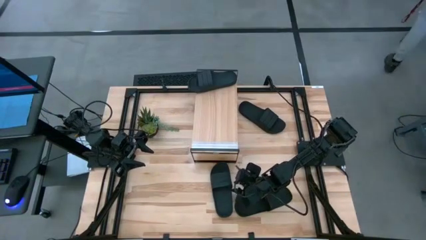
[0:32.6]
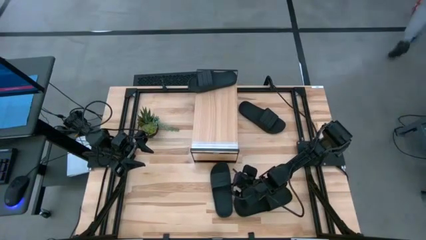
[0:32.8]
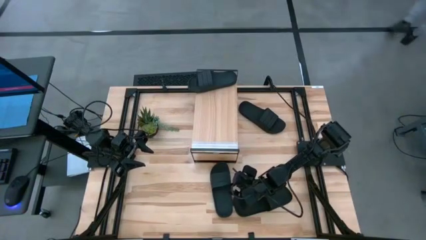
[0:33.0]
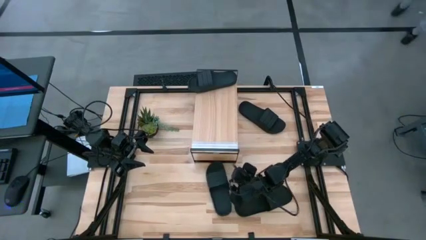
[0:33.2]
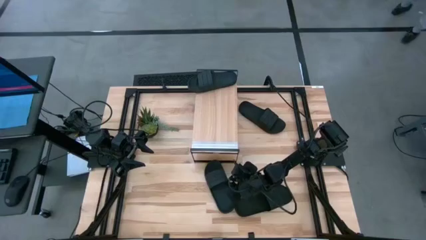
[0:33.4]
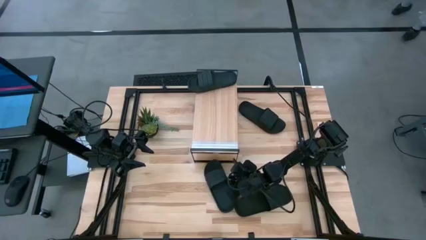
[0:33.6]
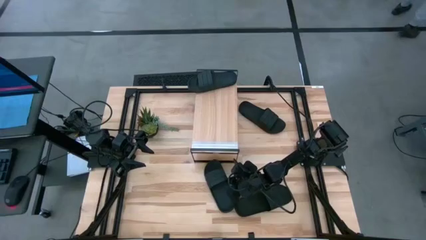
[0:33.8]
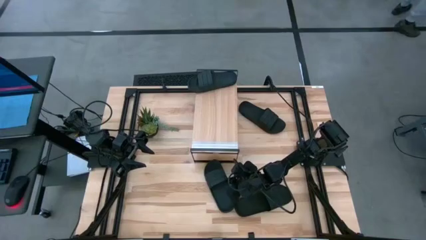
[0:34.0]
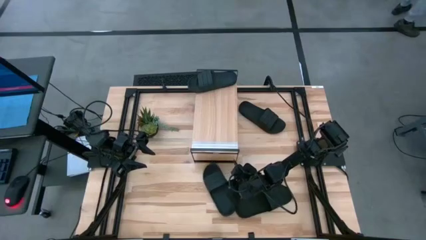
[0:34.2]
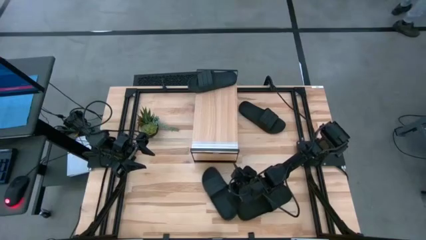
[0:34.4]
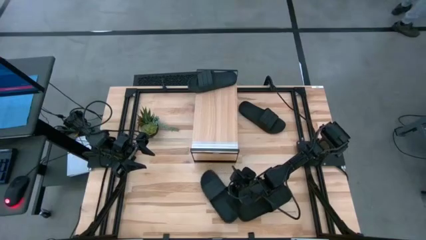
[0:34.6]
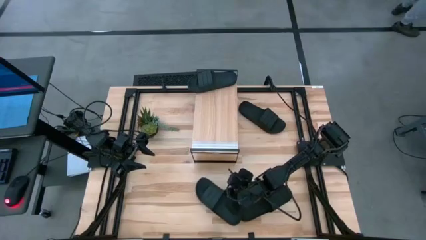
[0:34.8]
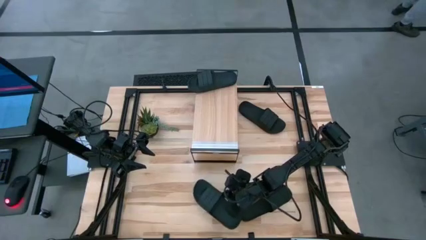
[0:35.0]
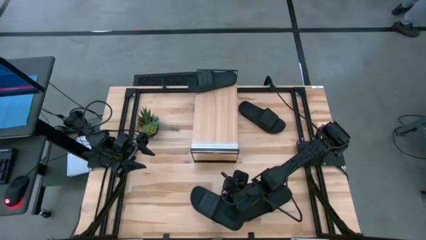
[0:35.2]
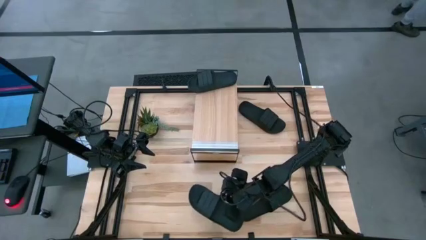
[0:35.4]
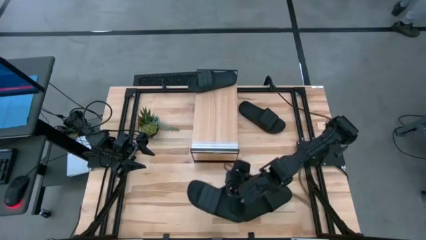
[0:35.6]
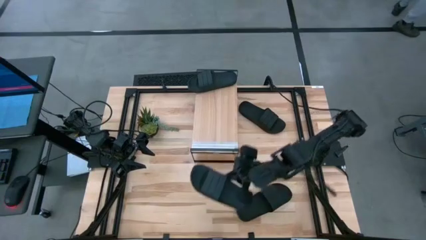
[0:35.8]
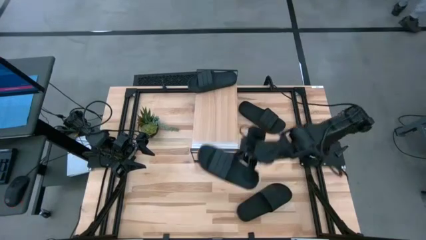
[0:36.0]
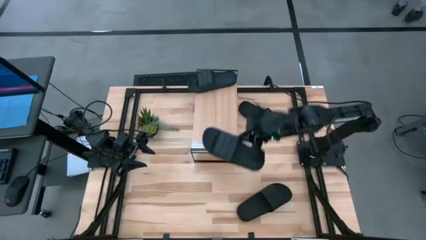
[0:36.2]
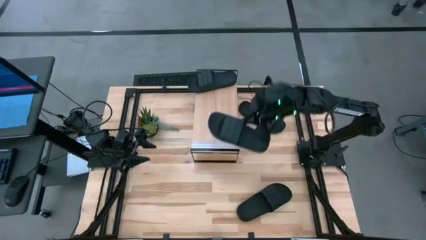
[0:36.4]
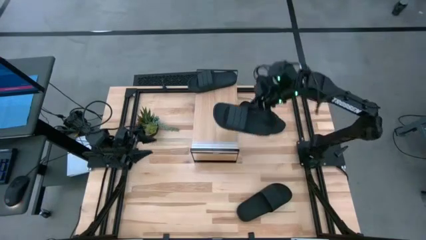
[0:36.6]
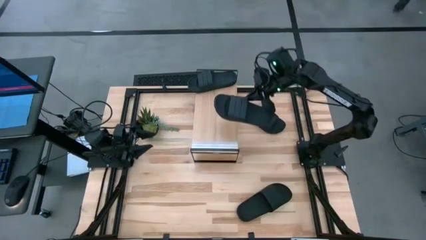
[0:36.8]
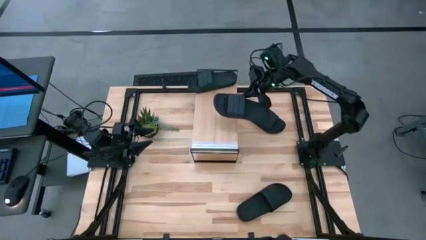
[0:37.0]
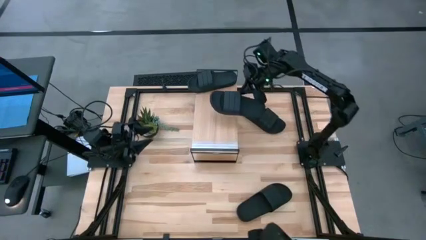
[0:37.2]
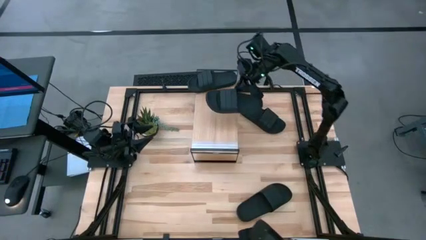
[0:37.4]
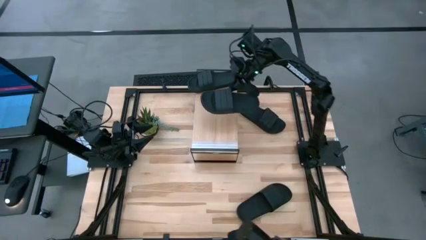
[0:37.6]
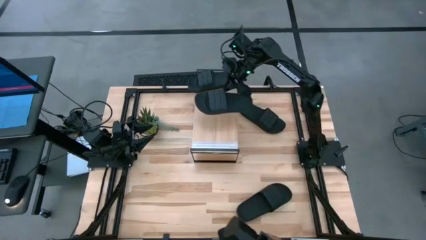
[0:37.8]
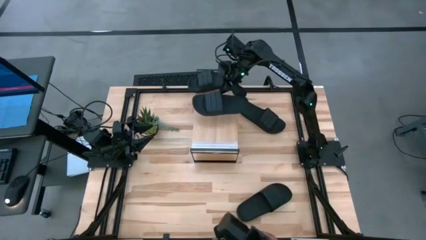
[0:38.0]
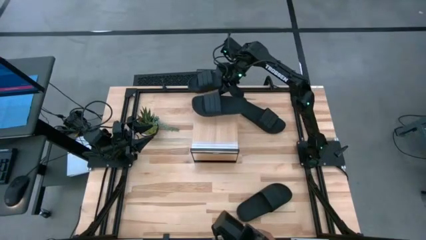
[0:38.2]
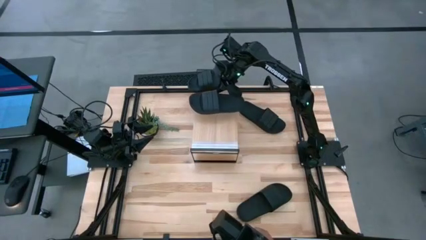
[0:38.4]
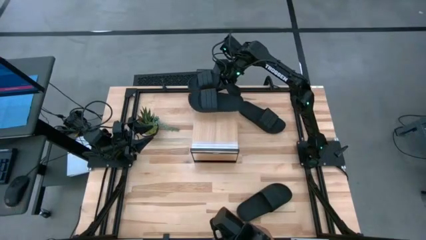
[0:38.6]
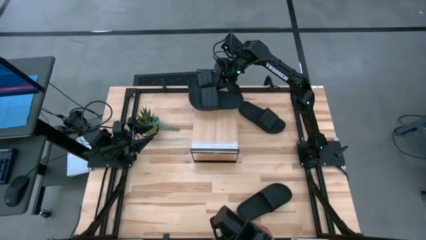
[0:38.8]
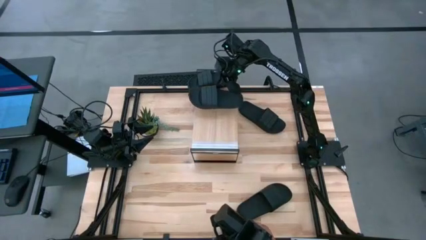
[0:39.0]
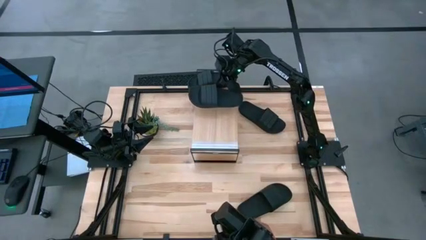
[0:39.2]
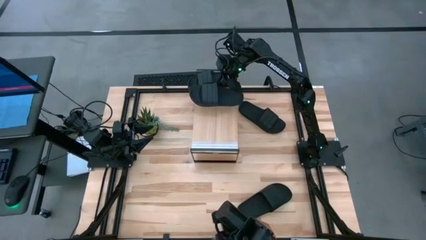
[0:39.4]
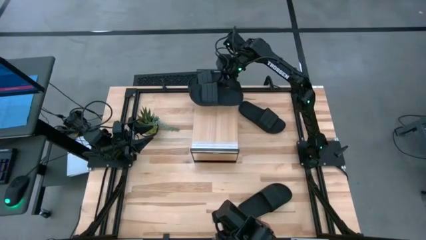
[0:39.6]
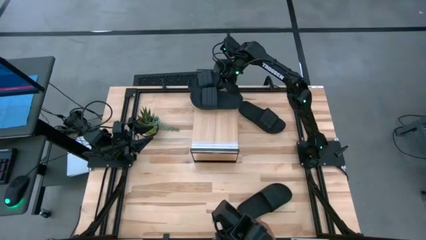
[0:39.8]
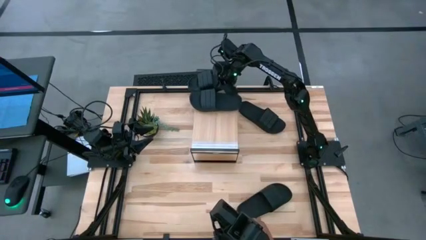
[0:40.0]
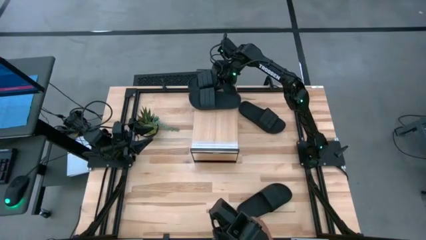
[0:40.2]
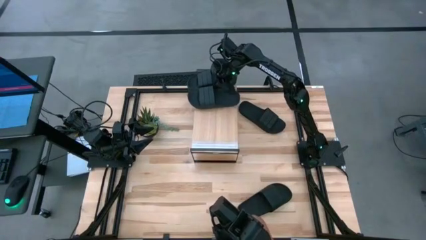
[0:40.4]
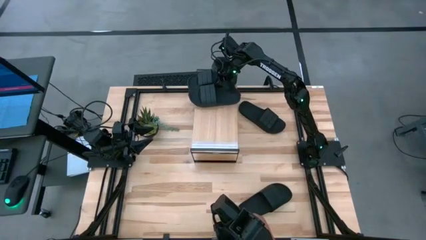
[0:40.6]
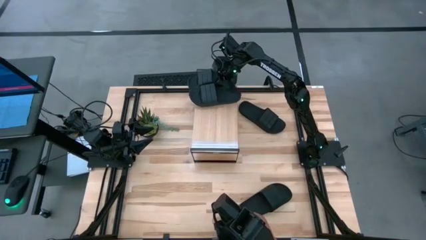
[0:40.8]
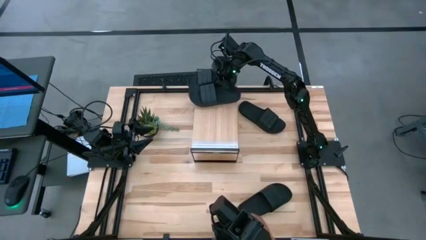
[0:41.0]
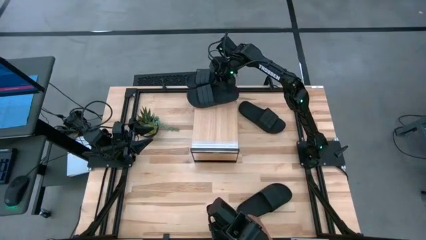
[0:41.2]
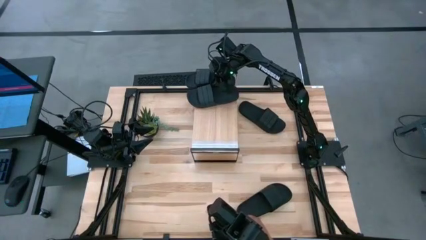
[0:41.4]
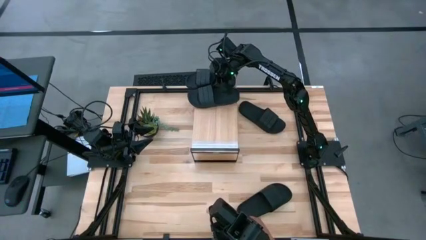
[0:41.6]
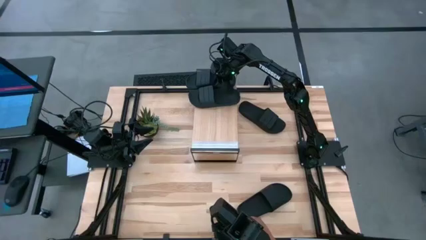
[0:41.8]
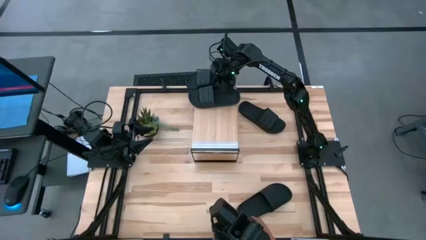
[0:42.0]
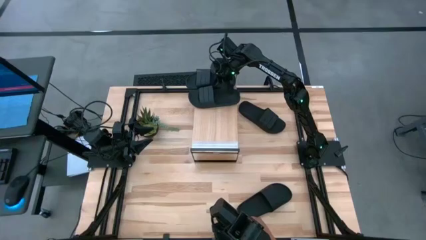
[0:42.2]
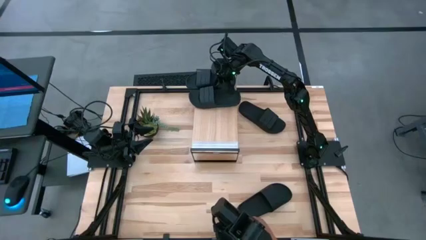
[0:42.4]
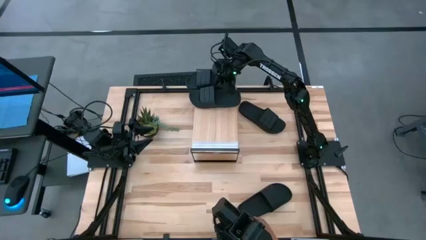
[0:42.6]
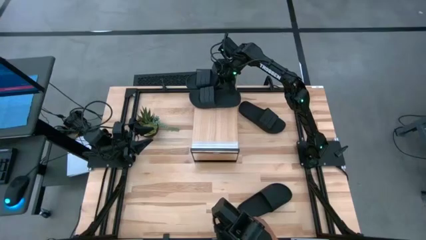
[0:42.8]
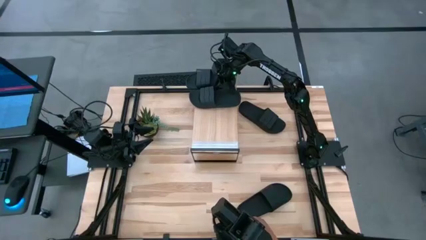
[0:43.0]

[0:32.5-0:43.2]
Task: Pick and place slides into the shelf
Put the bottom left black slide on the shelf
